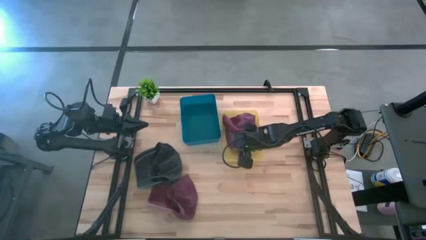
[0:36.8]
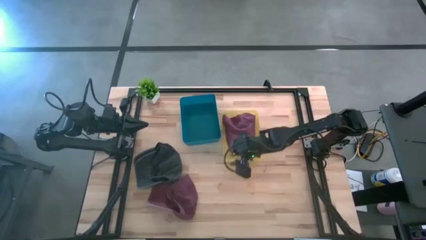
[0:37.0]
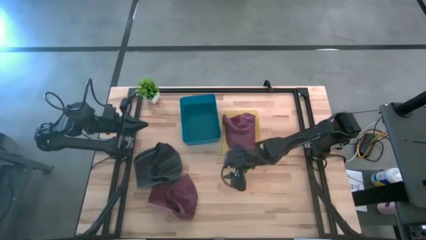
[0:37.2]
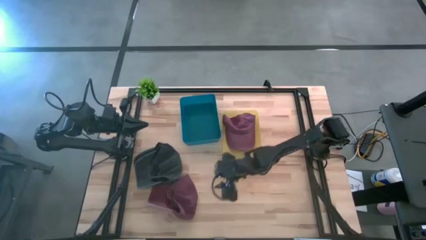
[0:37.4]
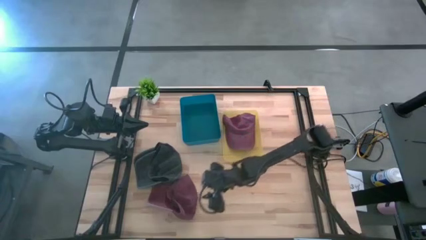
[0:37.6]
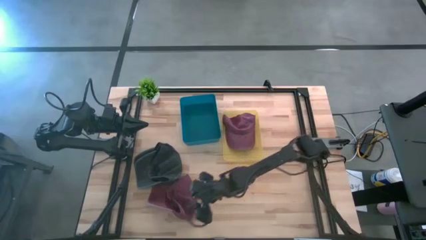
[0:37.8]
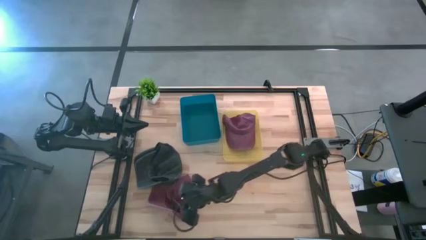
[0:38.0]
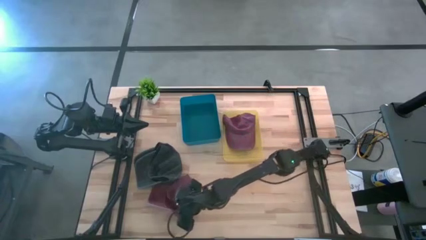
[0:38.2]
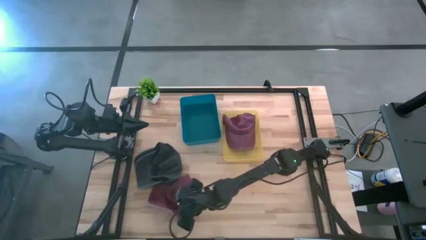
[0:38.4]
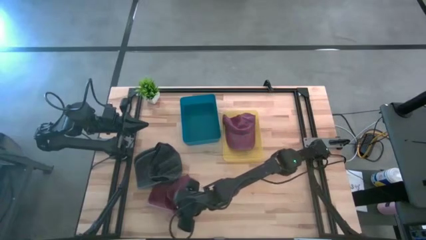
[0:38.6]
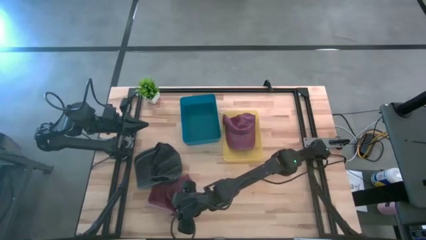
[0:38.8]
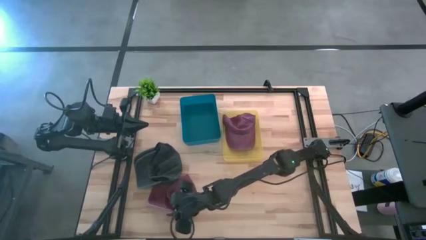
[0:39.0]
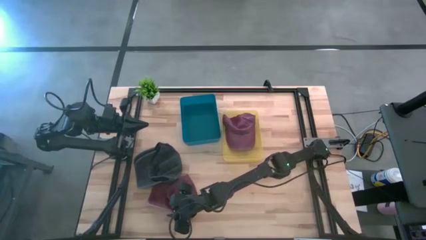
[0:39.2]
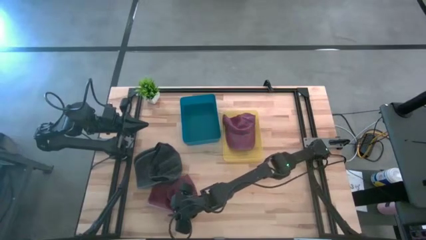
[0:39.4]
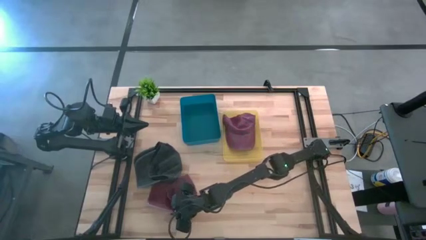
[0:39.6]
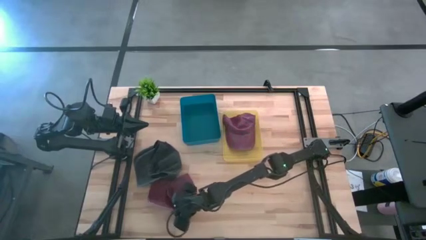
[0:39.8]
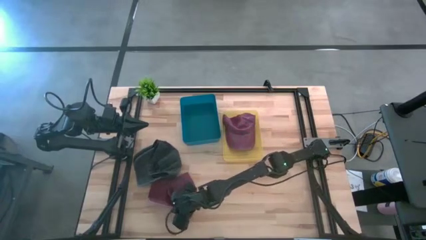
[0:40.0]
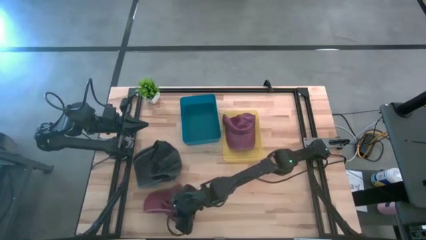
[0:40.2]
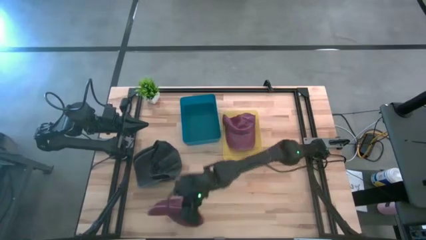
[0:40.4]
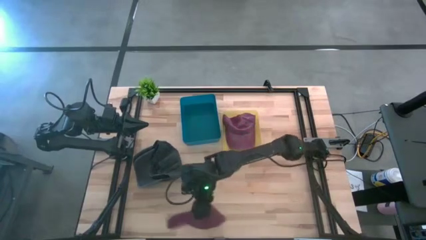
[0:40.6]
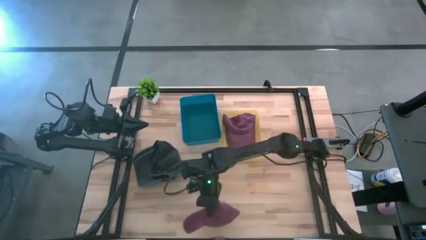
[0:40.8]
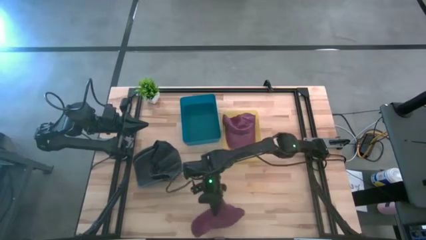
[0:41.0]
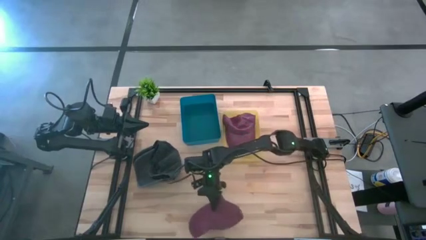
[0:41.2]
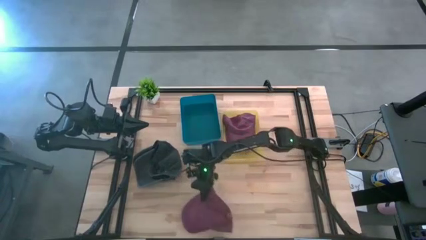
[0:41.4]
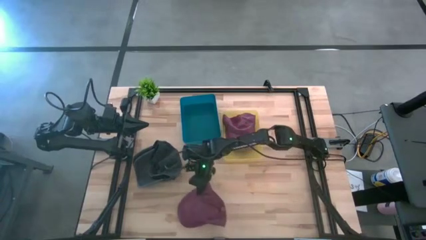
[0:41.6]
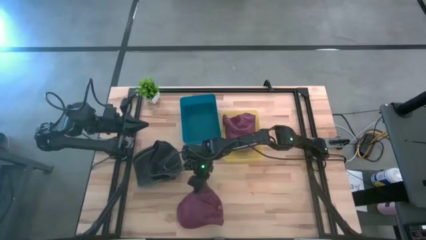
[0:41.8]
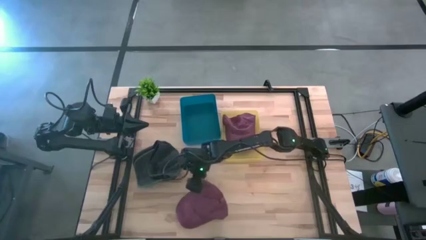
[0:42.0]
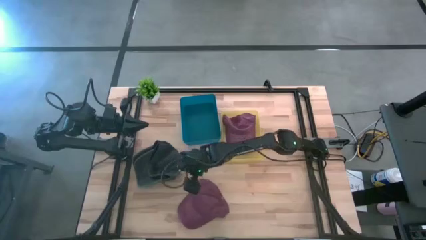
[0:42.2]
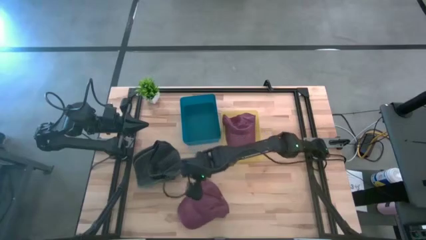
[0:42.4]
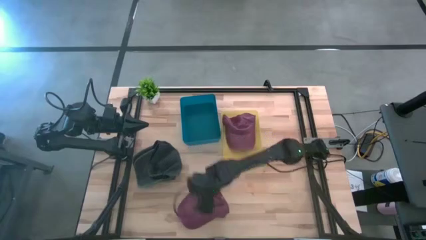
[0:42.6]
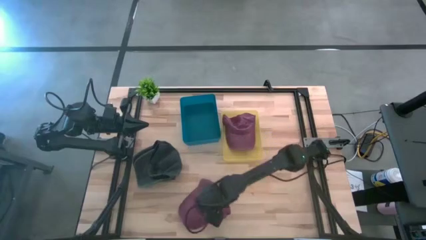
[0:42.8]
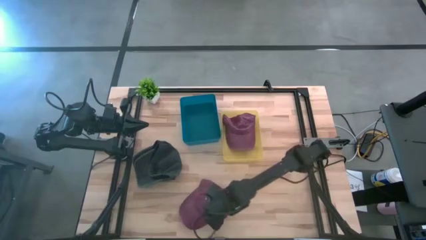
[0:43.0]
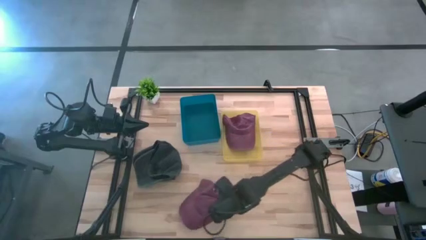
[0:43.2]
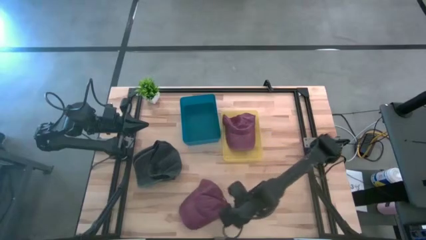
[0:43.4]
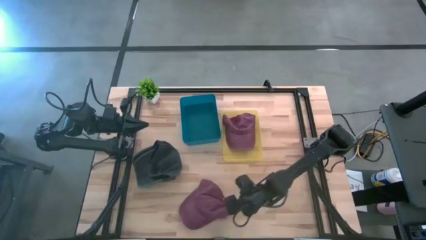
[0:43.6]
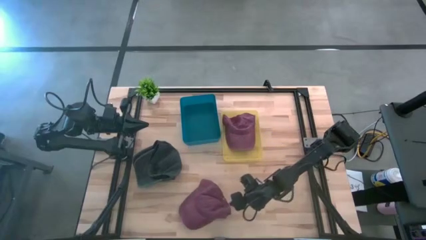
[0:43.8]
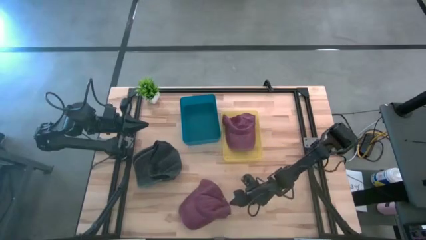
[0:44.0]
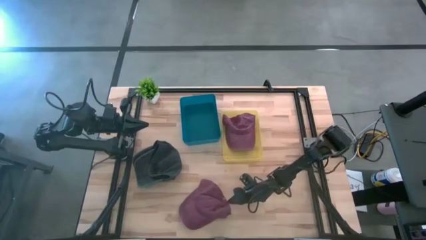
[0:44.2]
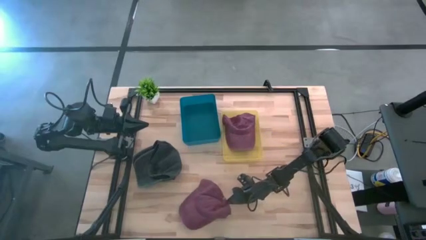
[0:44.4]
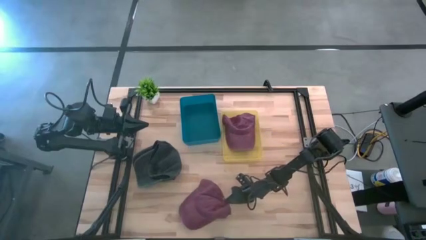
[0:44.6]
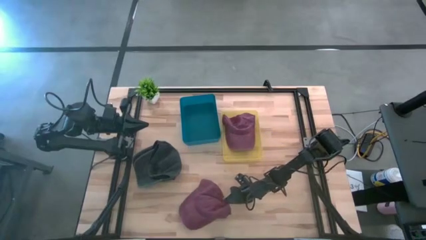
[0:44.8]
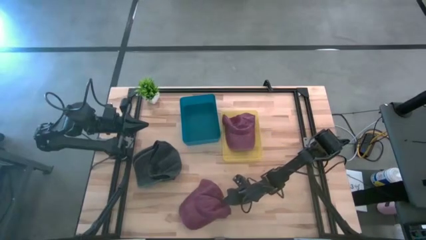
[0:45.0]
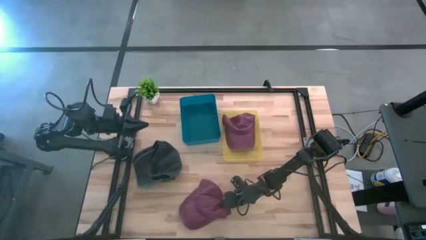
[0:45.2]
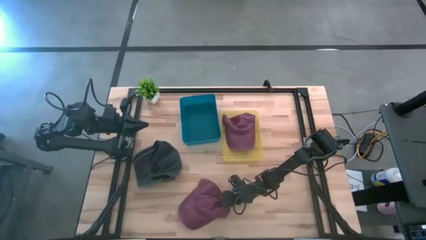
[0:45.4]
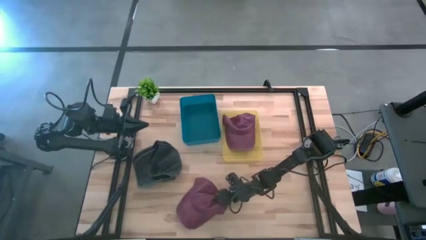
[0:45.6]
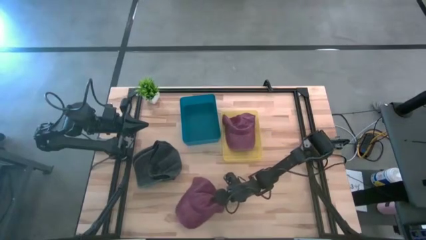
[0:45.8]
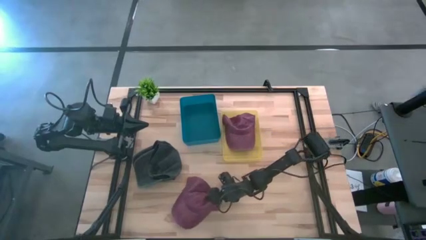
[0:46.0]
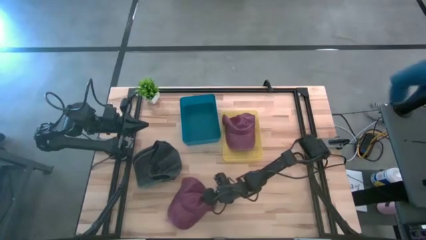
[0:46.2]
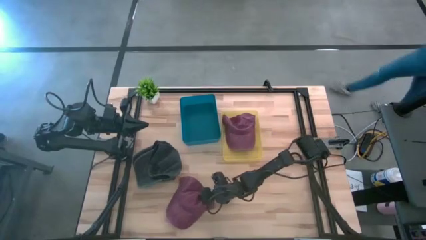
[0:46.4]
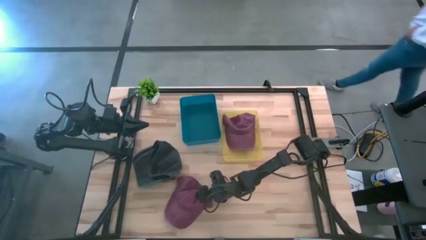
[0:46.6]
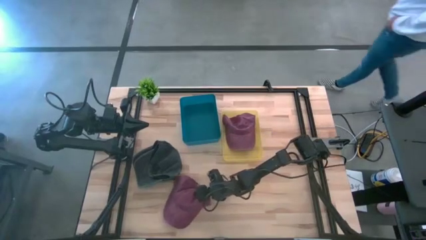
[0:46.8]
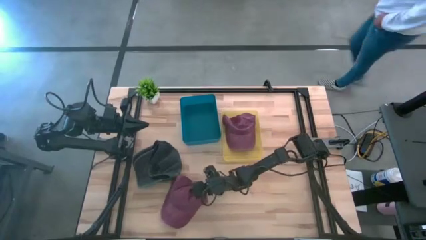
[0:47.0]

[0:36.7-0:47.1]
Task: Pick & Place hat
Put the red cap into the yellow bin
